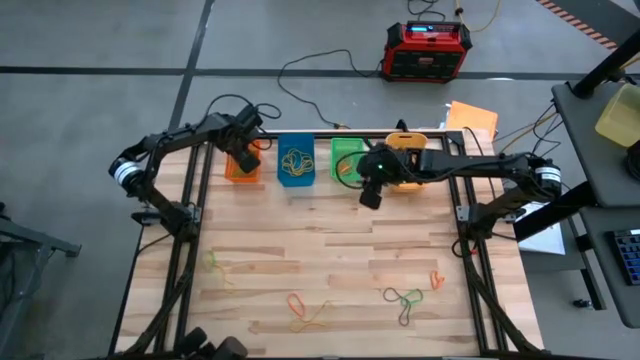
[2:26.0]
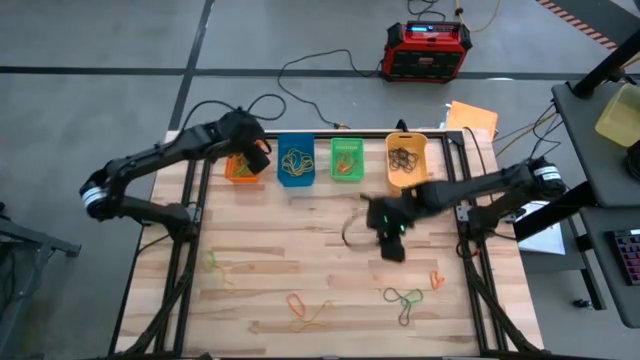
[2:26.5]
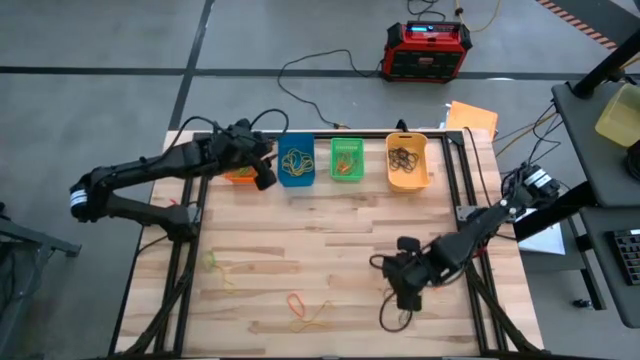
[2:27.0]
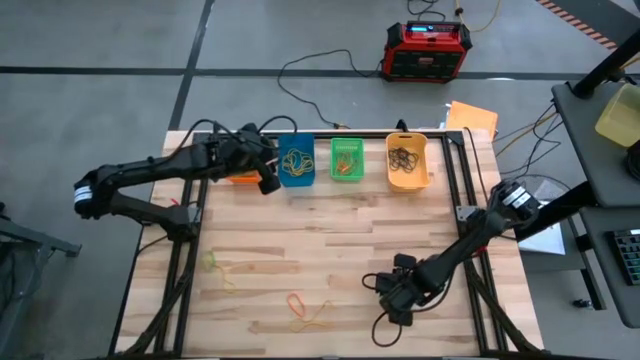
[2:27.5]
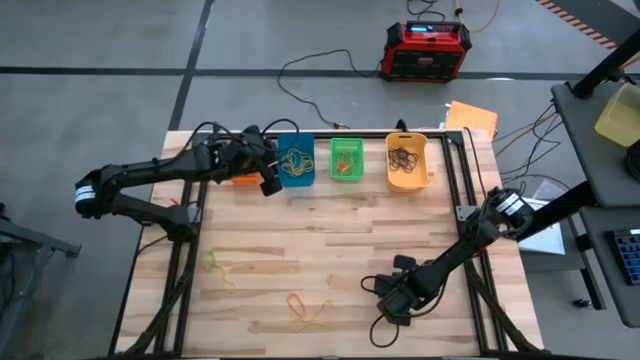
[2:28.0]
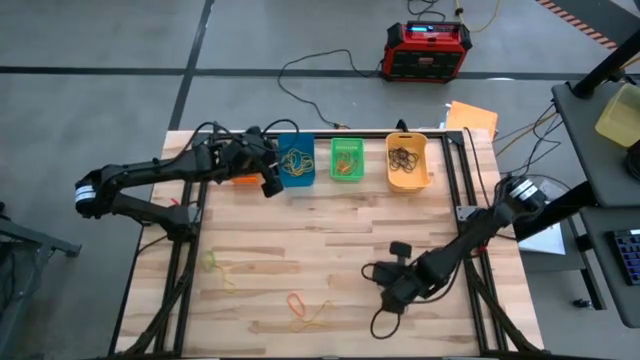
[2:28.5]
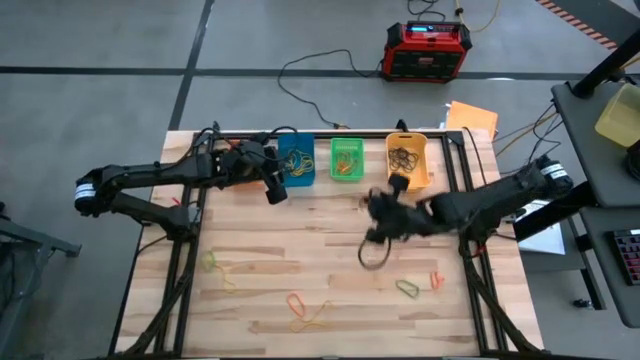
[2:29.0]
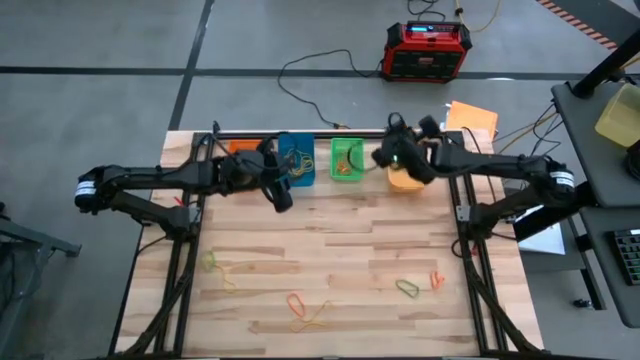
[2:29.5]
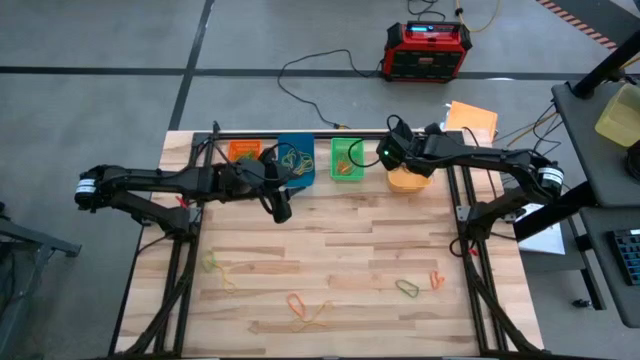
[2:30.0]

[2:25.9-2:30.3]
Task: Sort rubber bands into baskets
Put the purple rubber band into the light orange bin

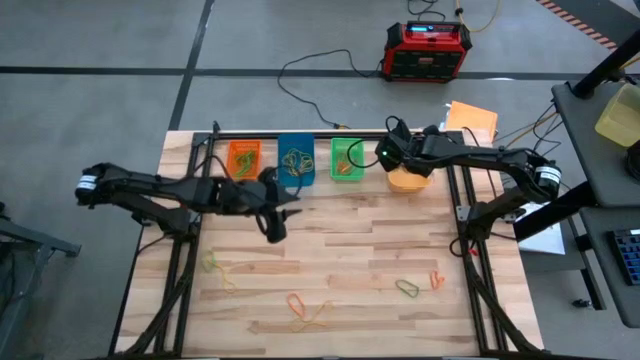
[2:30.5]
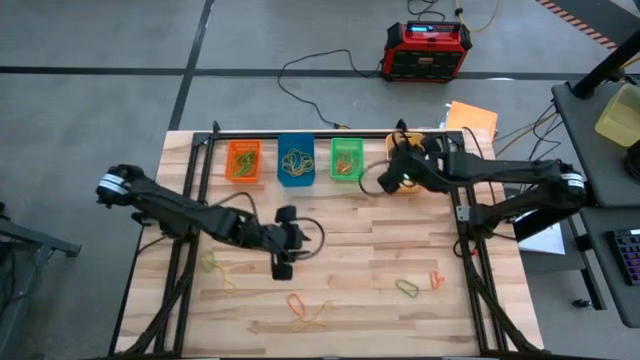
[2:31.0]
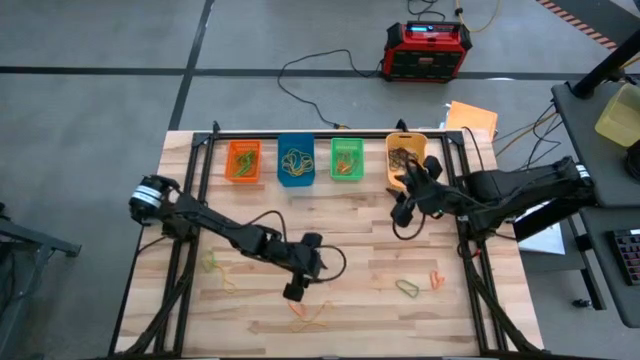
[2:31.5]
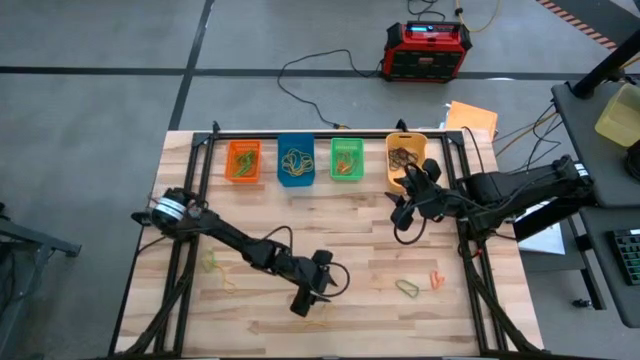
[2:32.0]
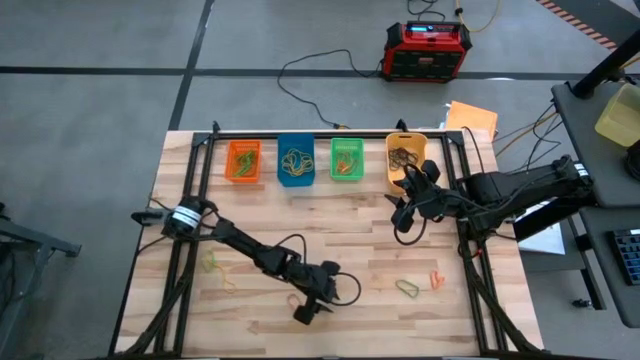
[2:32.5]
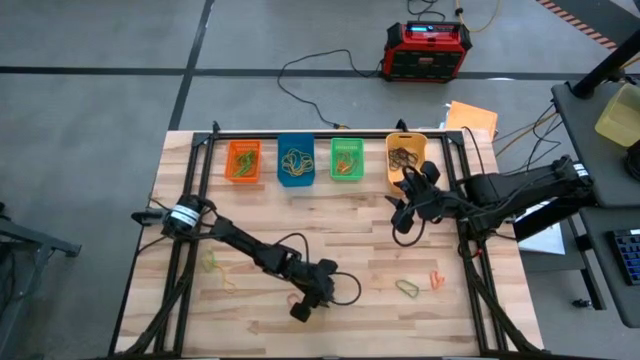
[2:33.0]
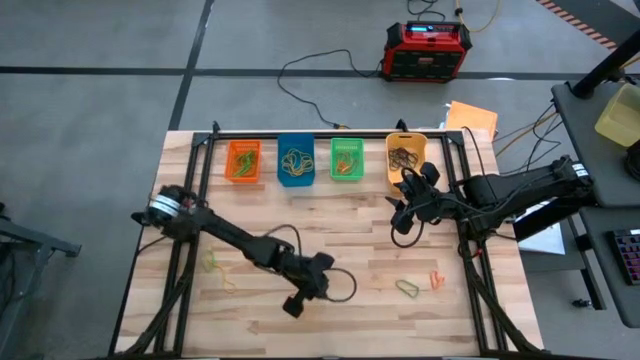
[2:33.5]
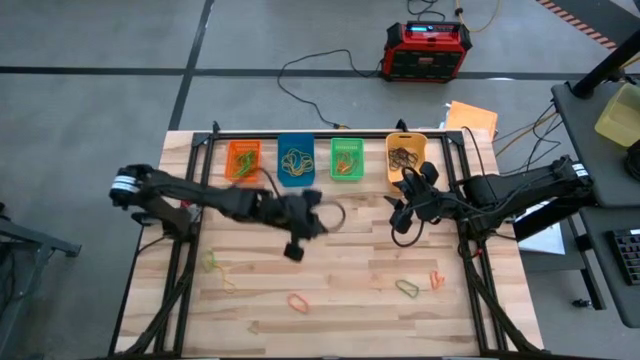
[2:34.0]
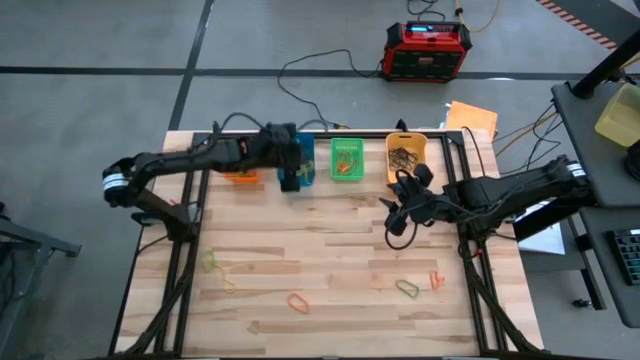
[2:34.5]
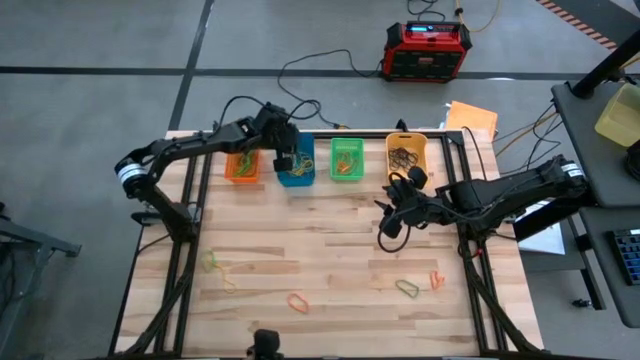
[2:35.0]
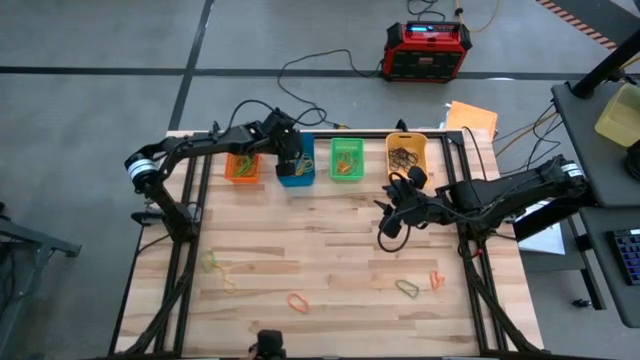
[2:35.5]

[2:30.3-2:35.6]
Put the yellow rubber band into the blue bin

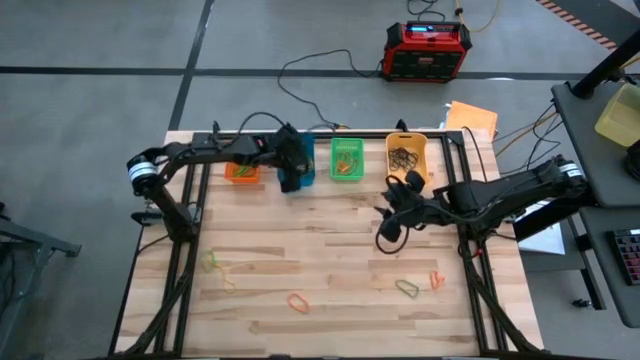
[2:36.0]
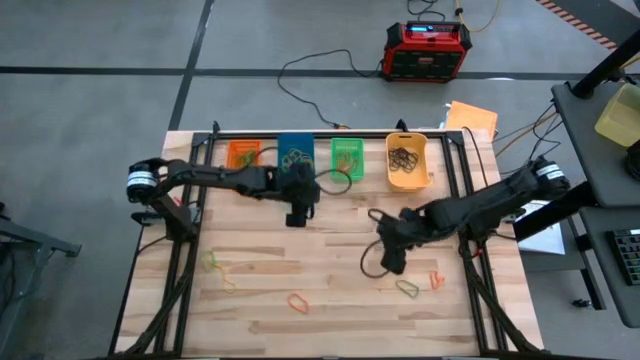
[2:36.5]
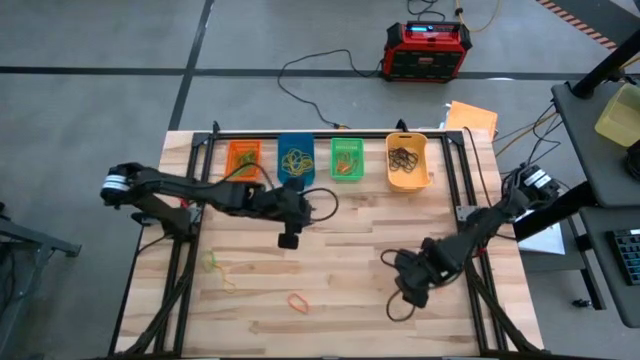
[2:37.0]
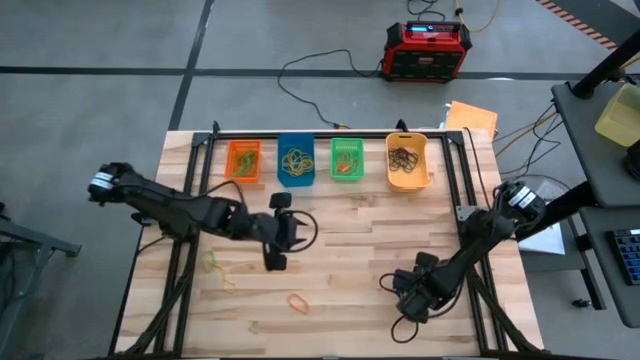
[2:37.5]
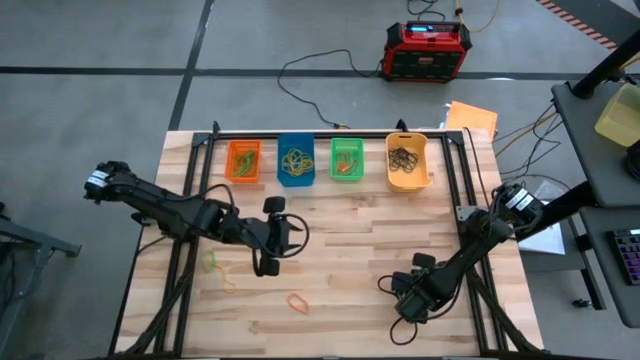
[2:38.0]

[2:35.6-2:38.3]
Put the green rubber band into the orange bin

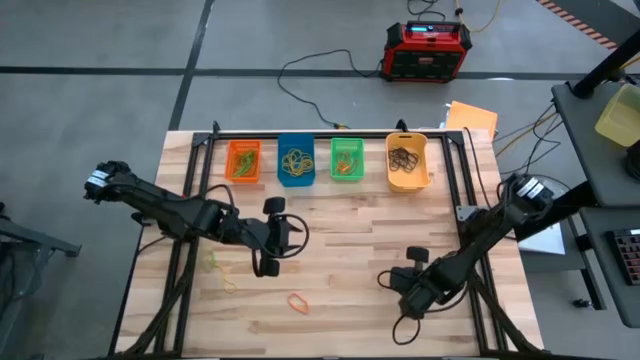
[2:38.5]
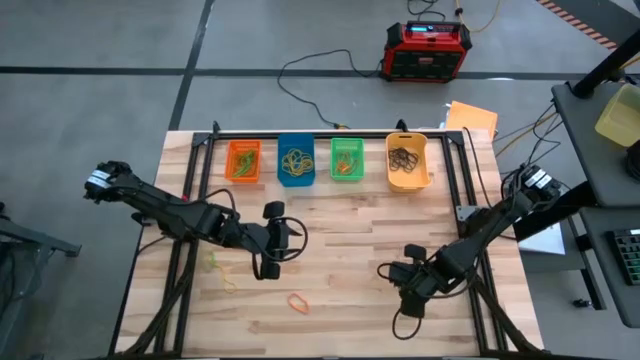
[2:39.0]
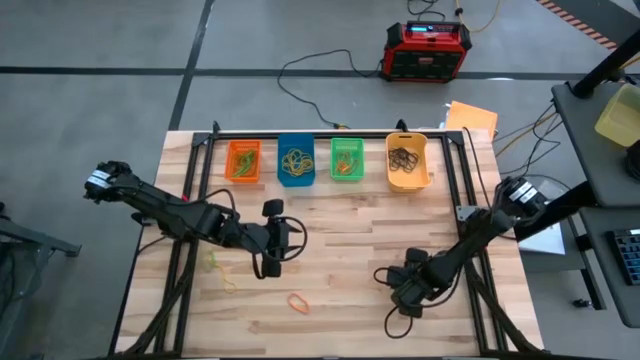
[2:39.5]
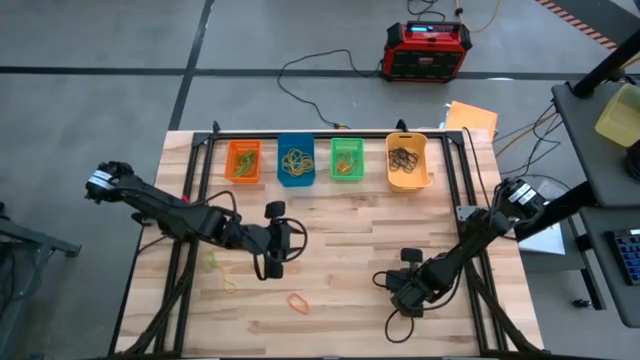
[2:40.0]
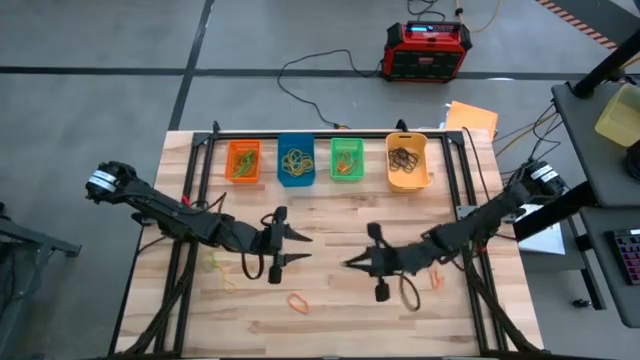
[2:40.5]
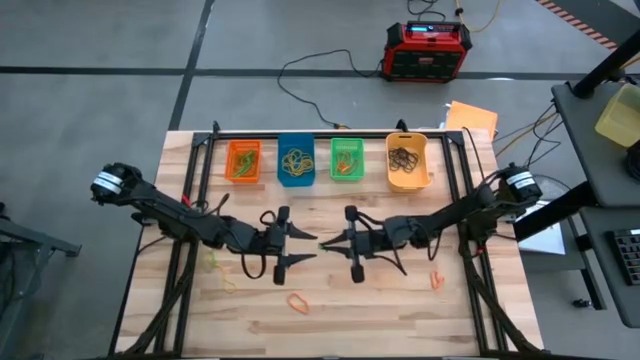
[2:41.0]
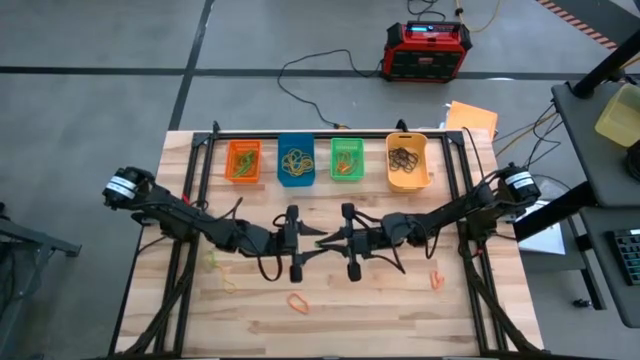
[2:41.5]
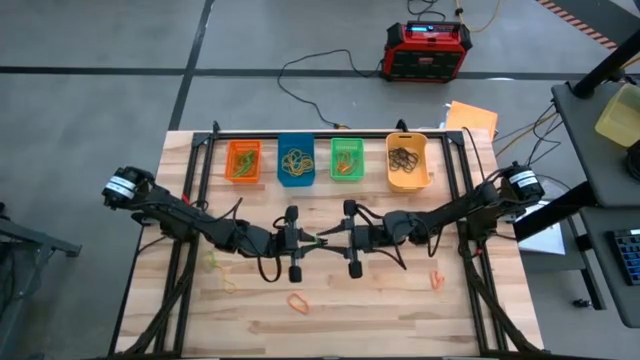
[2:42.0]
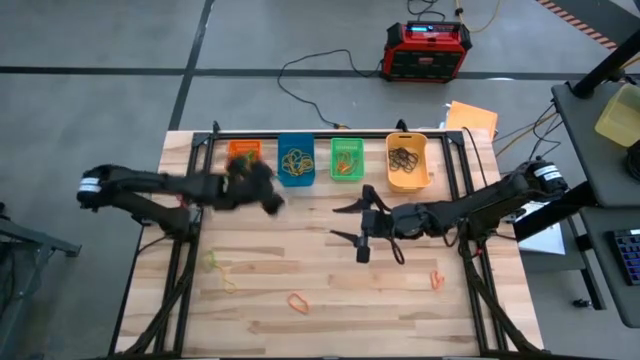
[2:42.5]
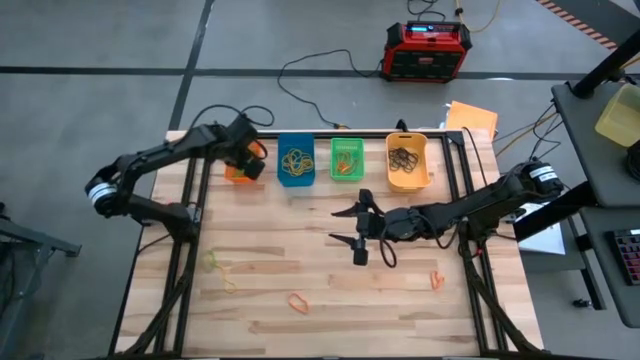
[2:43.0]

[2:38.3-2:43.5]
Put the green rubber band into the orange bin

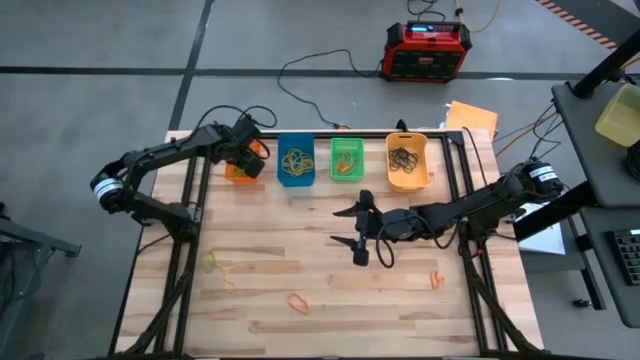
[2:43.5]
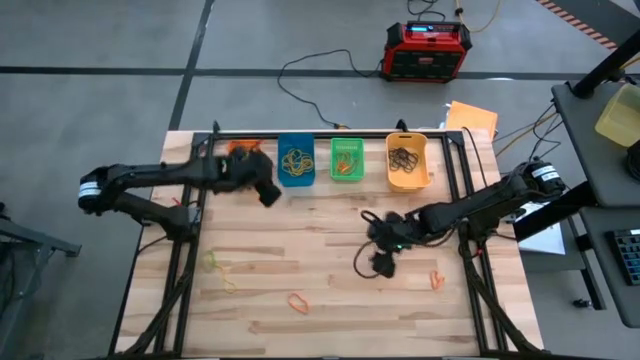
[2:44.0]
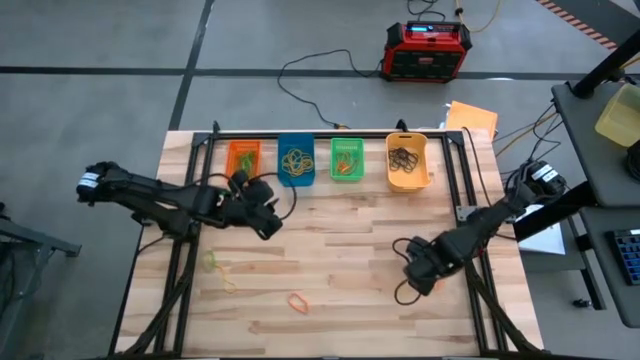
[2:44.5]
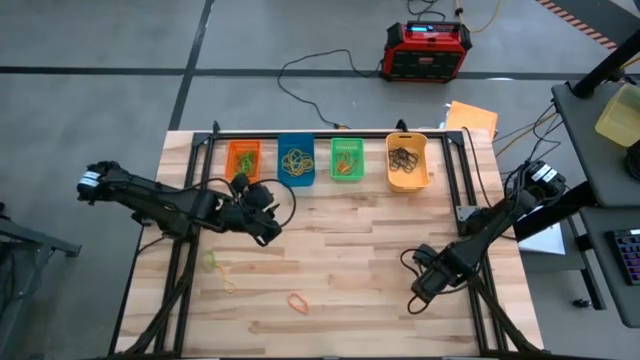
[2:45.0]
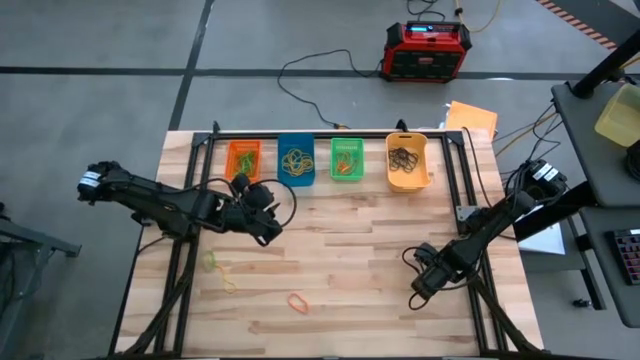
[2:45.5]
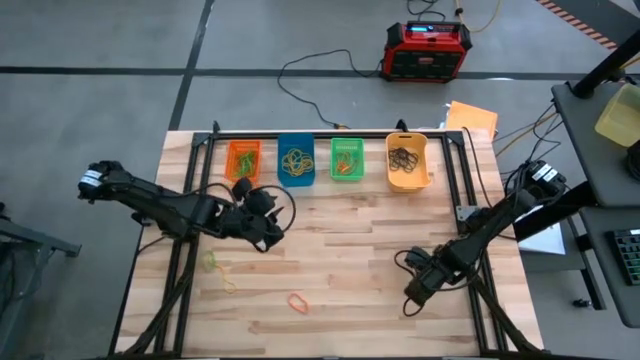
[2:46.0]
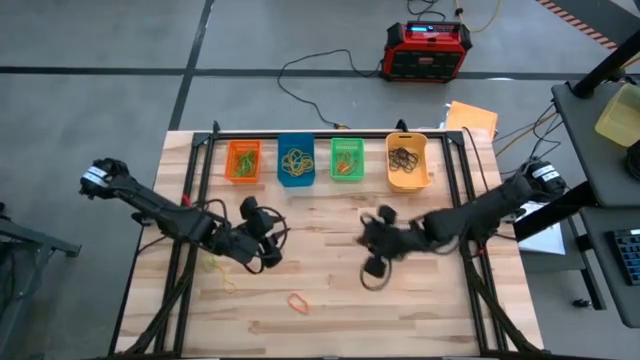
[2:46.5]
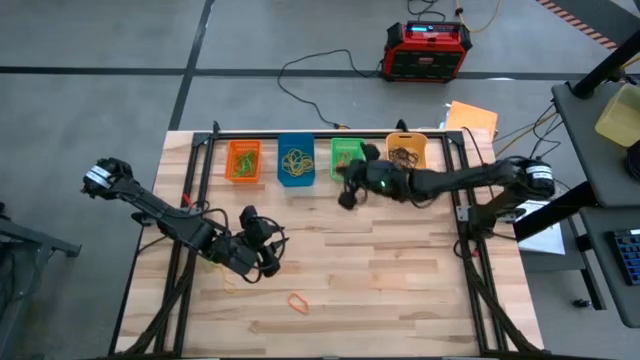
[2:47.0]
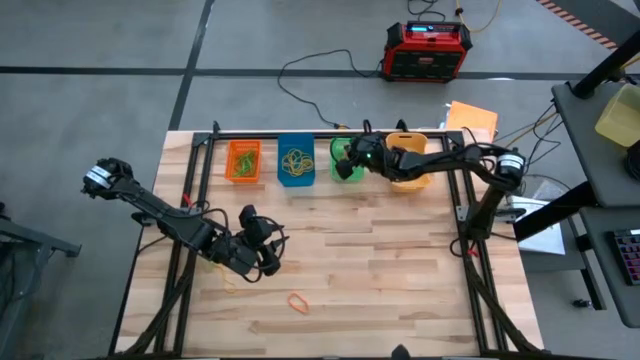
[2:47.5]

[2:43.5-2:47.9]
Put the orange rubber band into the green bin
